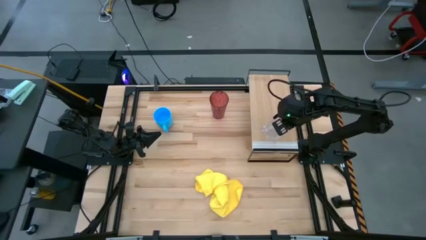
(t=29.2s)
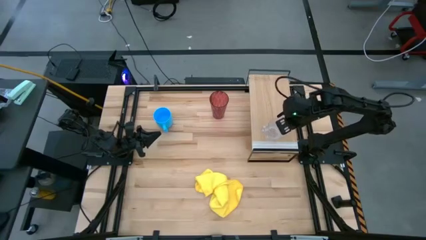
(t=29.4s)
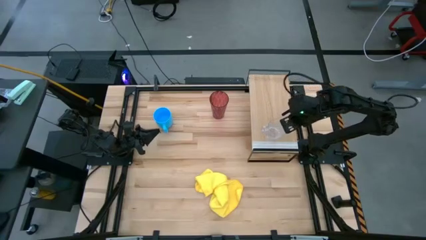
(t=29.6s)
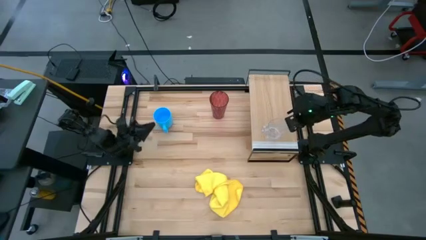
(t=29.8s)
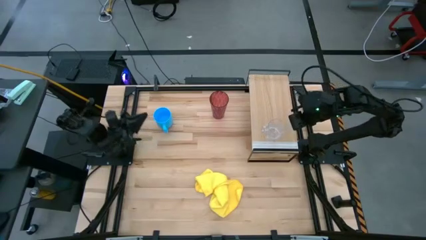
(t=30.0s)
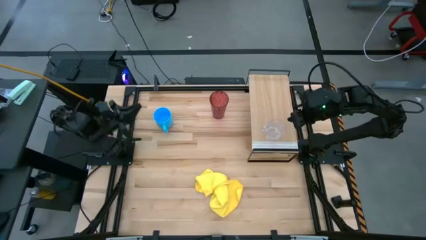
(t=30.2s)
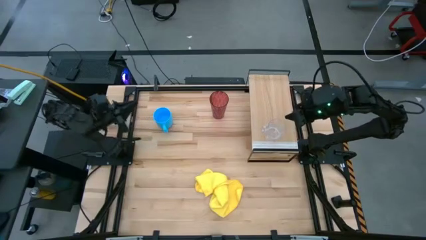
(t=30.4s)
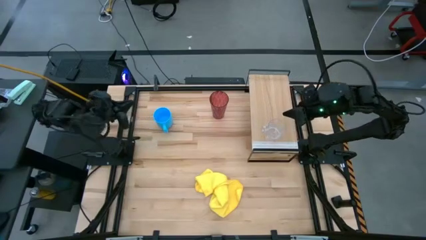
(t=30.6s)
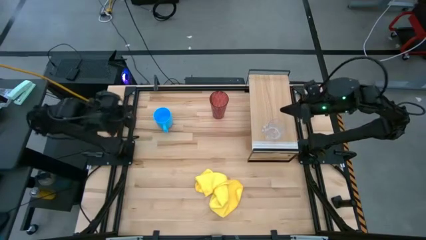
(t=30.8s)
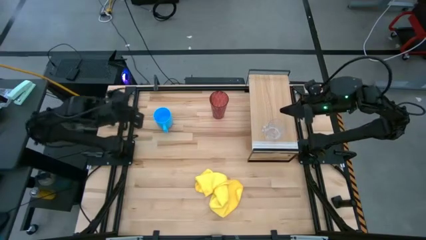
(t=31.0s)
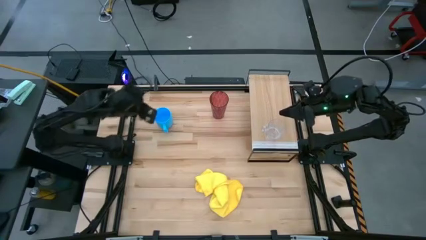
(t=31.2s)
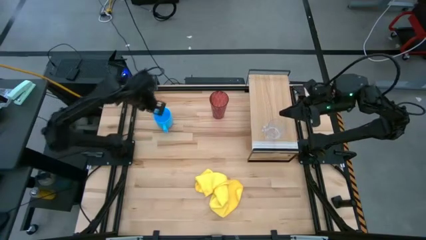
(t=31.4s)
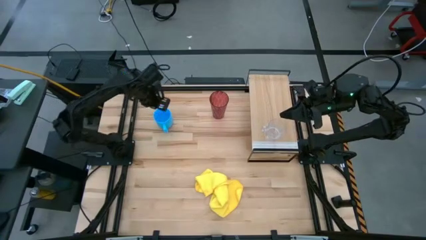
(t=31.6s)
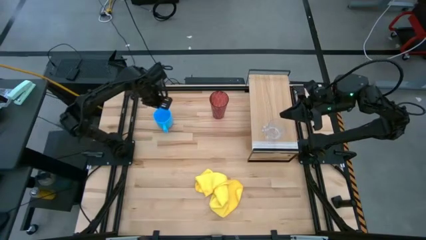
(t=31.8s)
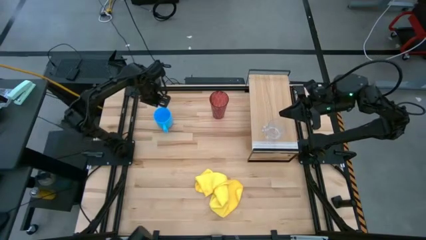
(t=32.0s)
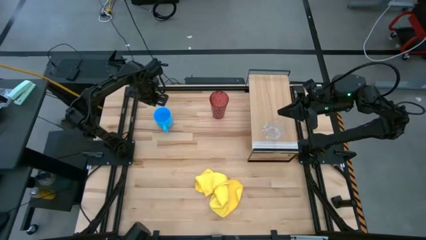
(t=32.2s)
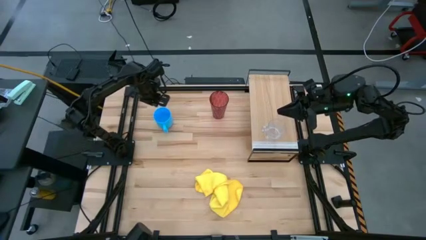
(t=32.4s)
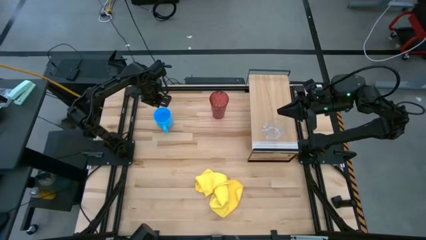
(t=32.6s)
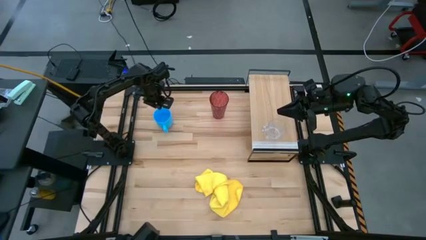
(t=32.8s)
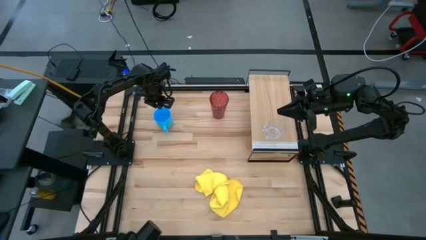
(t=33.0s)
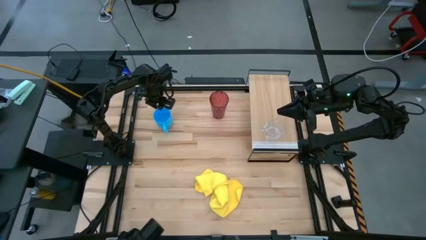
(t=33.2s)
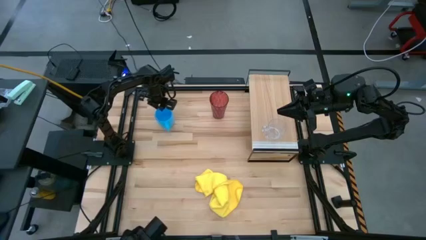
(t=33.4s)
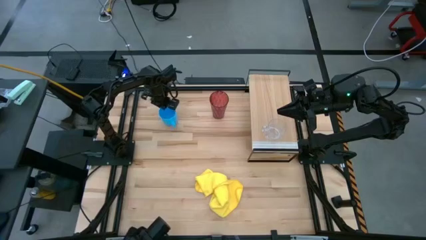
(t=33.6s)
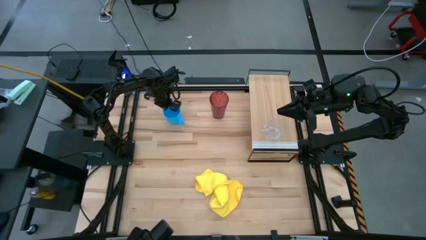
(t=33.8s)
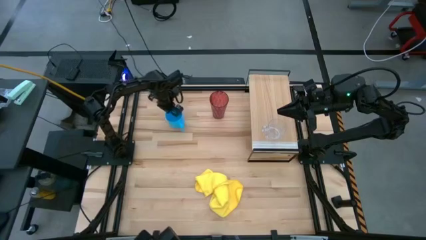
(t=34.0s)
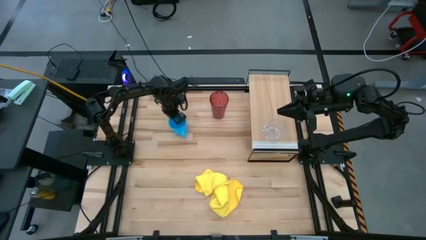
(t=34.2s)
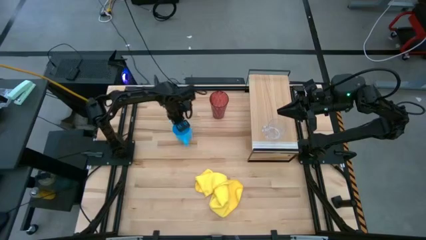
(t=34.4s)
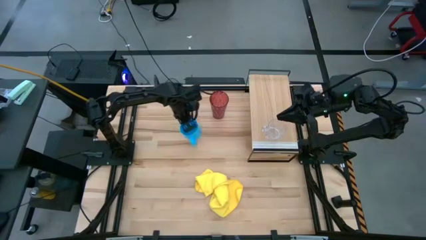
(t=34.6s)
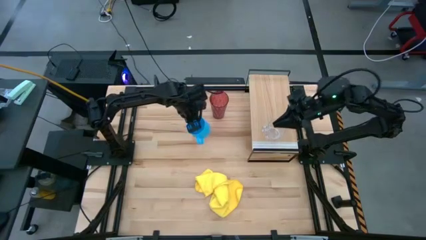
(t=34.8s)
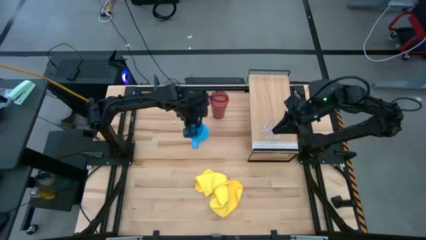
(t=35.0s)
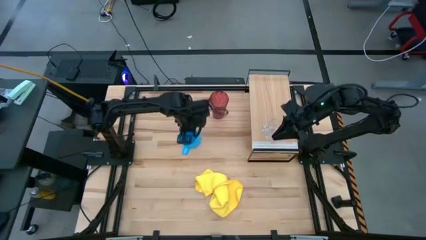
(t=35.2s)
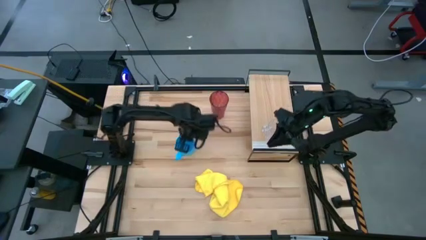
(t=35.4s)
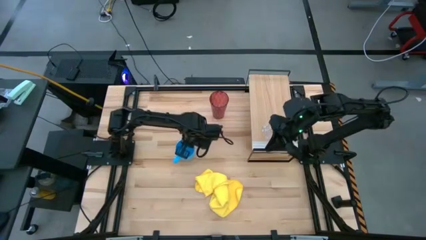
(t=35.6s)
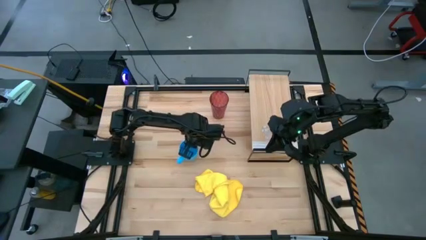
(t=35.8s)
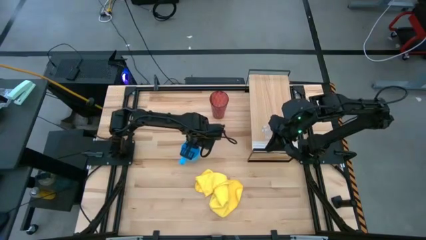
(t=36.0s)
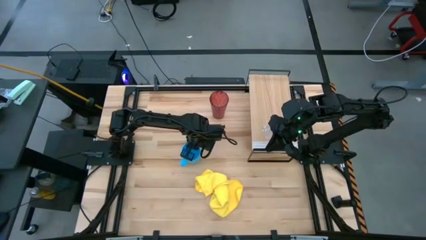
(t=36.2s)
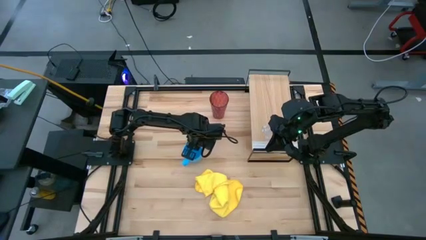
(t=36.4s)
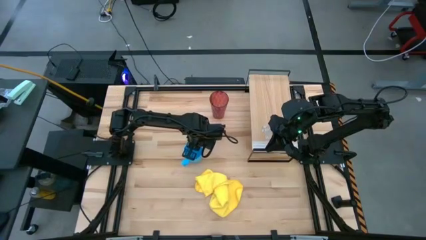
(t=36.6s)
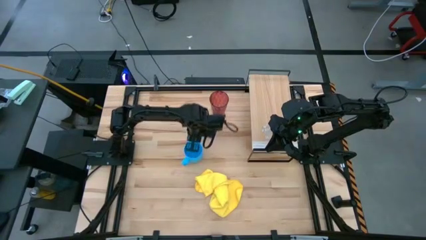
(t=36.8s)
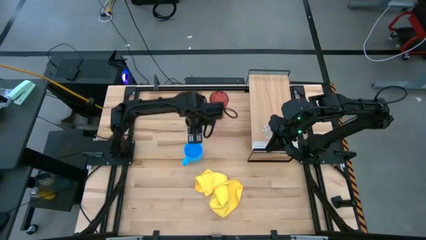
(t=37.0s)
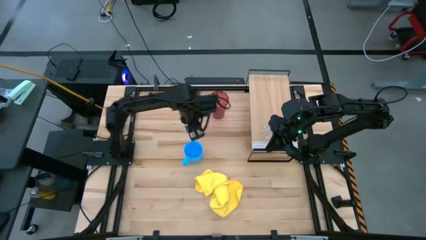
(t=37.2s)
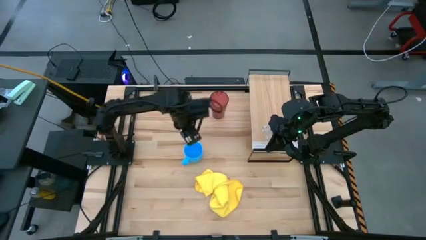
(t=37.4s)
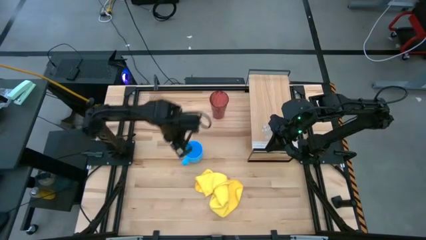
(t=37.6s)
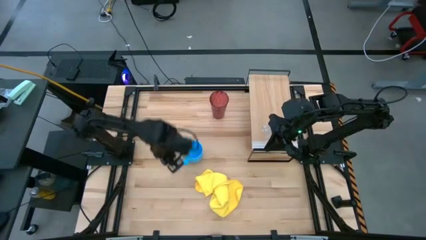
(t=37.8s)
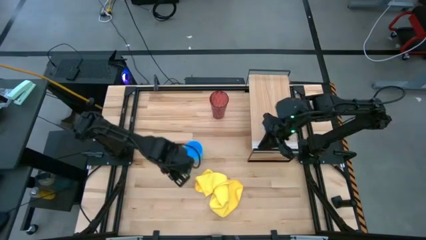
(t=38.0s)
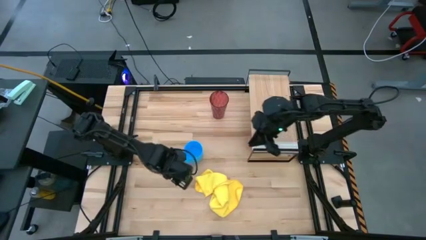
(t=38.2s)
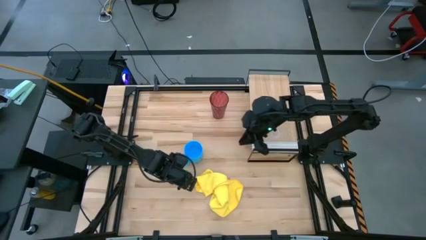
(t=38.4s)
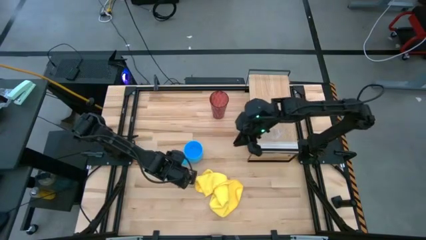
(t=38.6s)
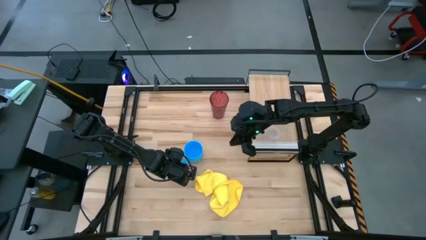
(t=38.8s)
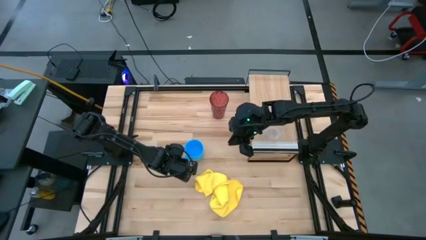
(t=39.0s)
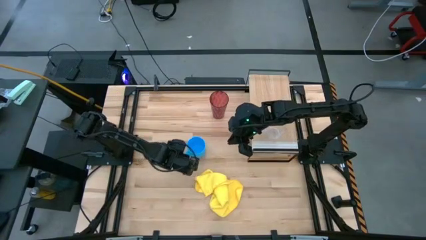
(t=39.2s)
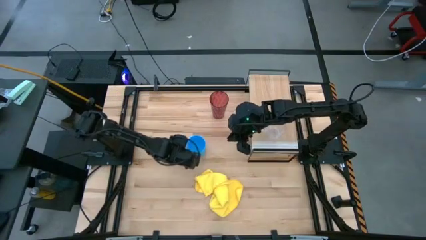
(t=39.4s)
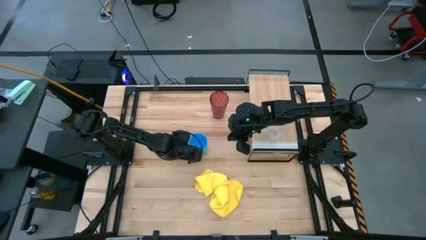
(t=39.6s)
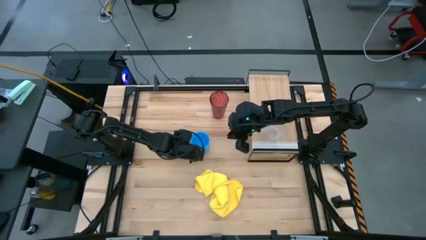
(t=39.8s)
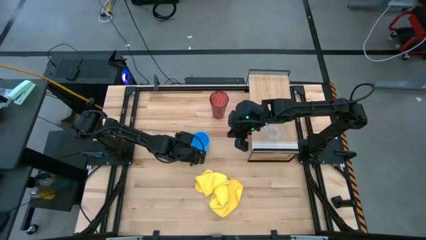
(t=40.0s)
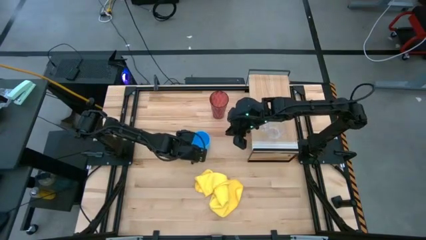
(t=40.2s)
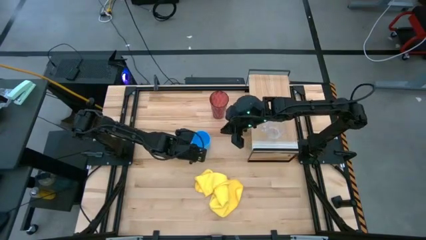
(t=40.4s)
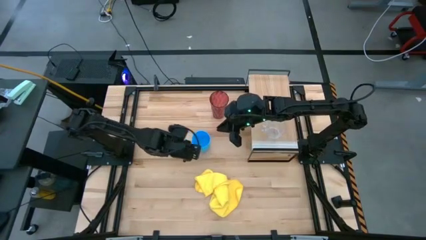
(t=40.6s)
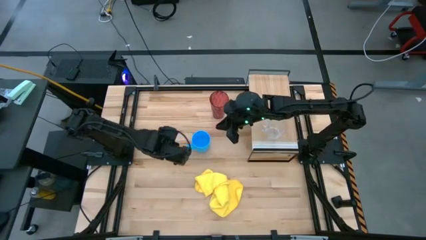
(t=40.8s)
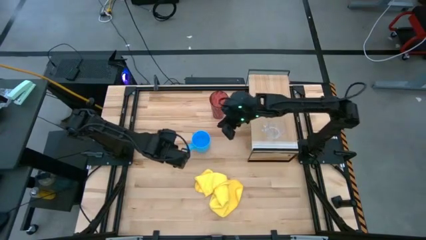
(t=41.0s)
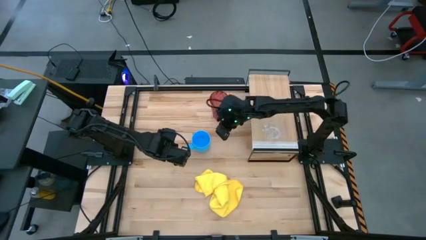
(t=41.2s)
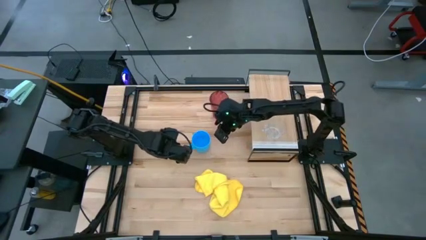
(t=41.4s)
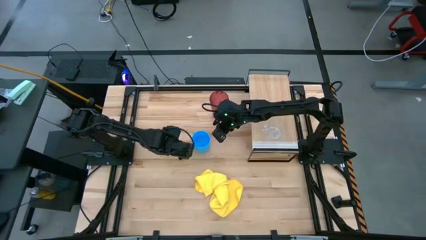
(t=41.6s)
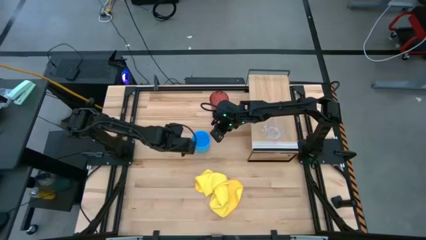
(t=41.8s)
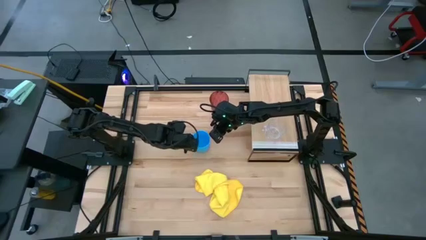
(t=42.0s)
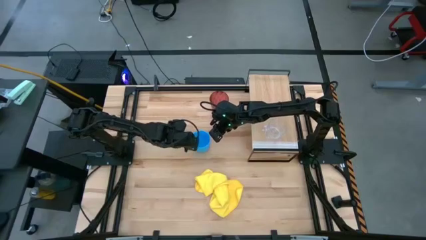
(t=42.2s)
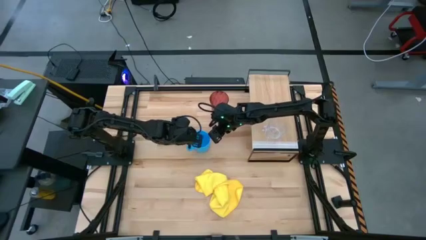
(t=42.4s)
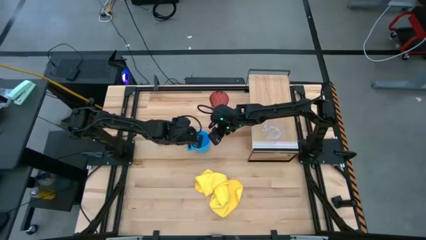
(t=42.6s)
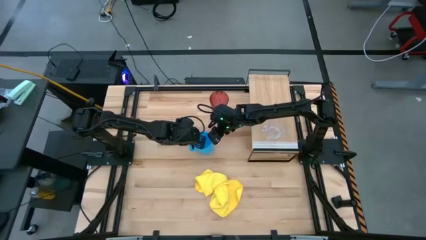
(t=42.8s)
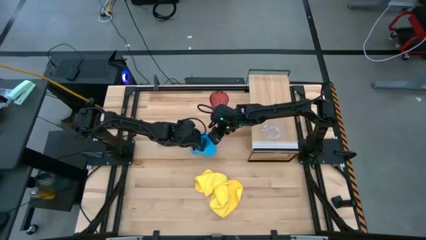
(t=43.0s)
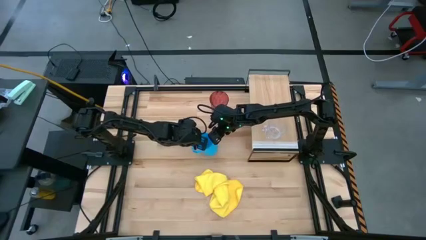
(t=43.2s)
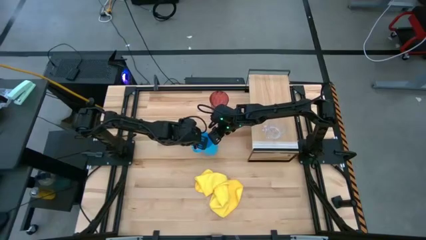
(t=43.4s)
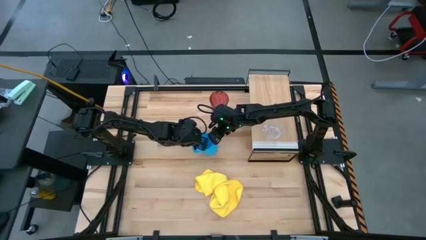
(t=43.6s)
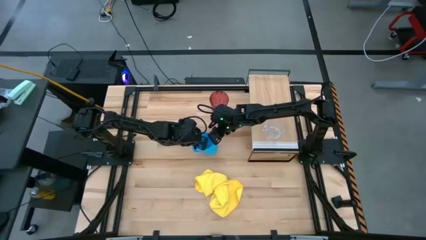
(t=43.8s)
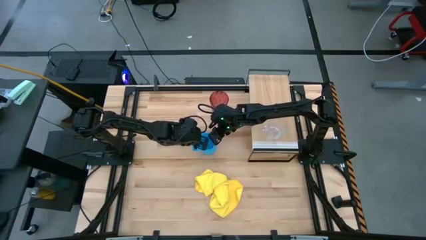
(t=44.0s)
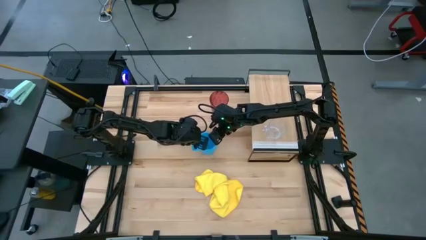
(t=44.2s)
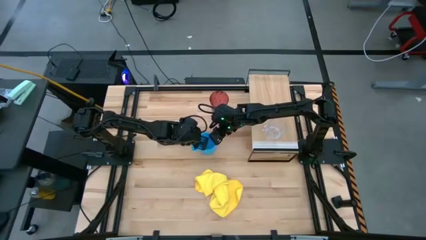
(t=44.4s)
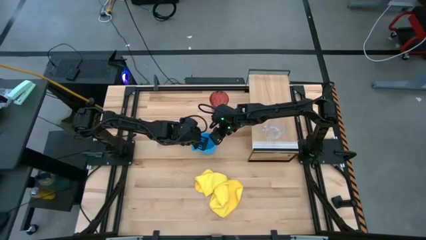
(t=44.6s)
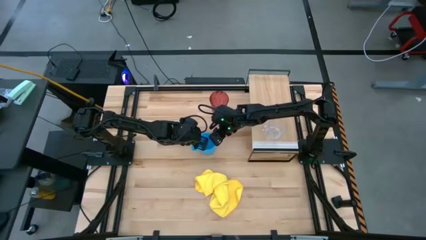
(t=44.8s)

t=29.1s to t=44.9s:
Task: Stack small to large cups/mugs on shelf
Put the blue mug on the shelf
